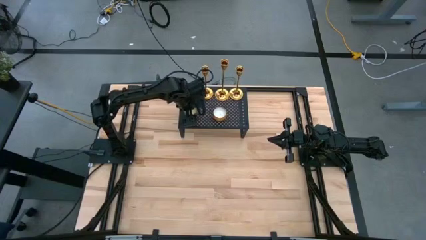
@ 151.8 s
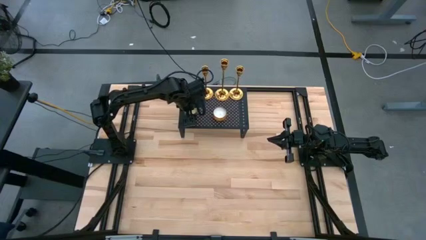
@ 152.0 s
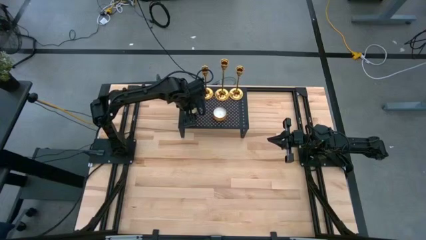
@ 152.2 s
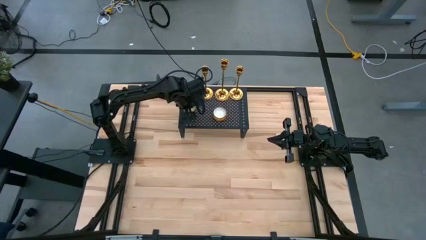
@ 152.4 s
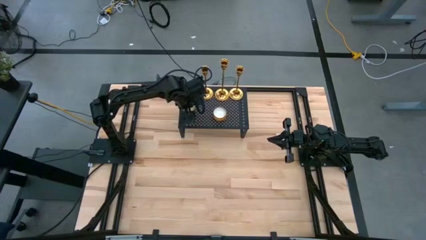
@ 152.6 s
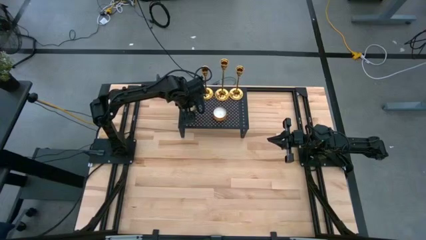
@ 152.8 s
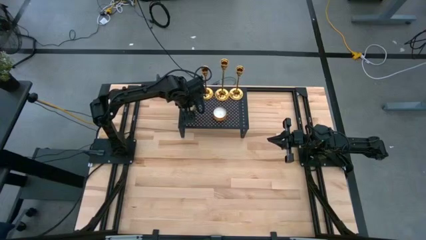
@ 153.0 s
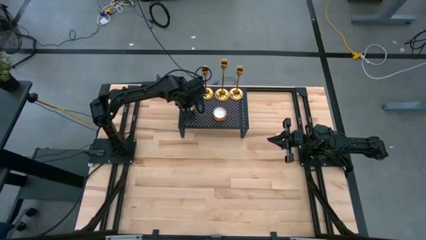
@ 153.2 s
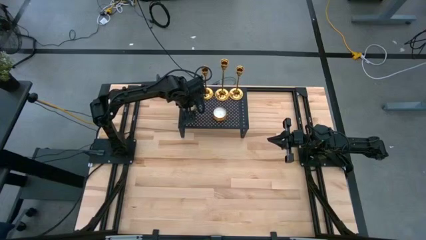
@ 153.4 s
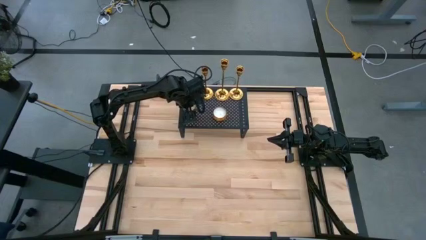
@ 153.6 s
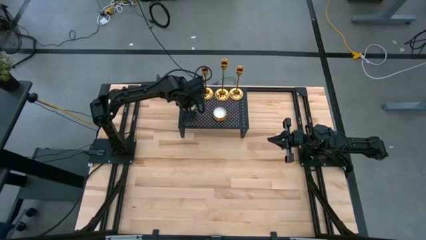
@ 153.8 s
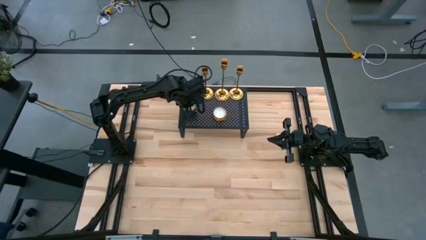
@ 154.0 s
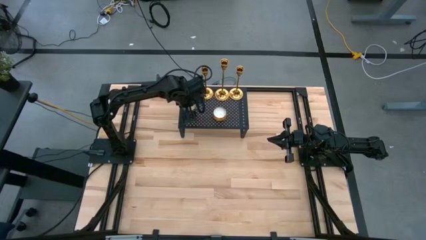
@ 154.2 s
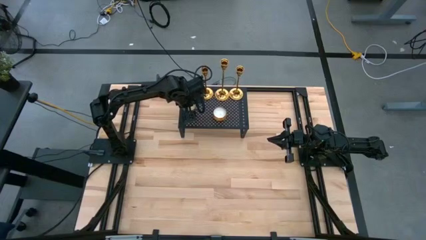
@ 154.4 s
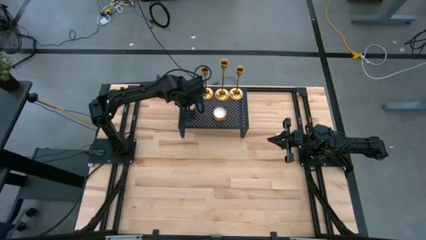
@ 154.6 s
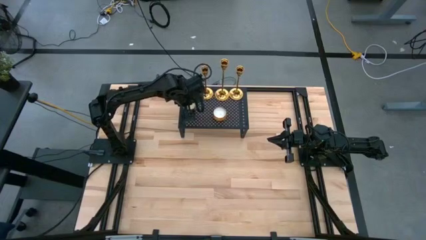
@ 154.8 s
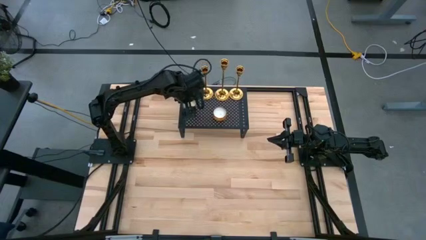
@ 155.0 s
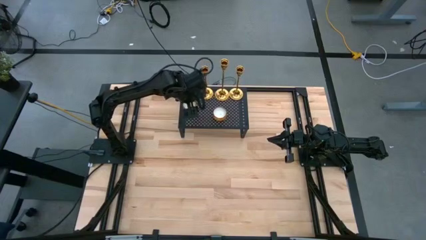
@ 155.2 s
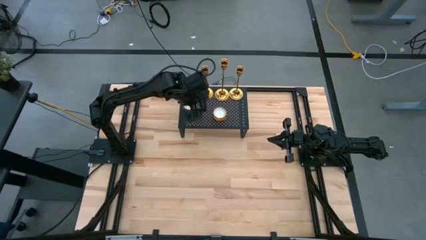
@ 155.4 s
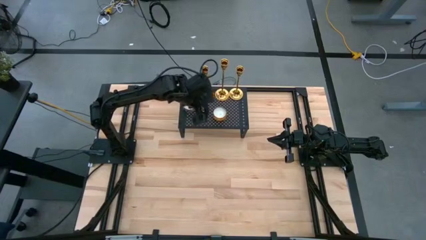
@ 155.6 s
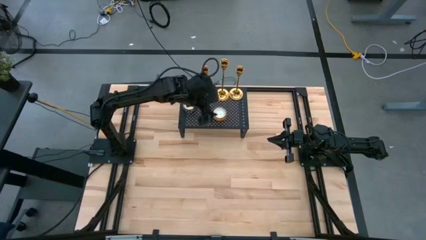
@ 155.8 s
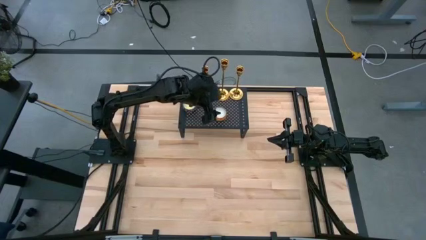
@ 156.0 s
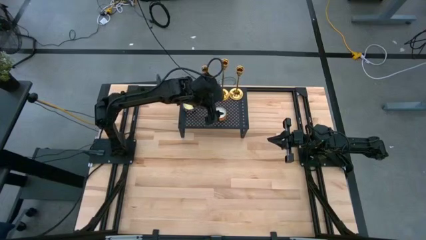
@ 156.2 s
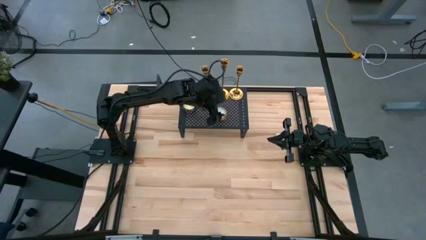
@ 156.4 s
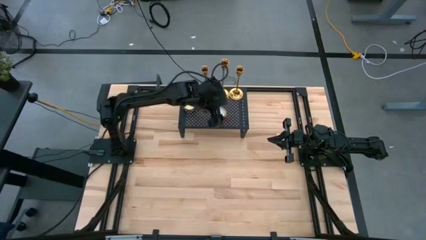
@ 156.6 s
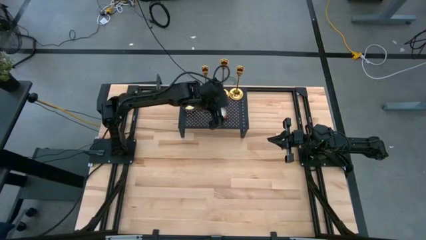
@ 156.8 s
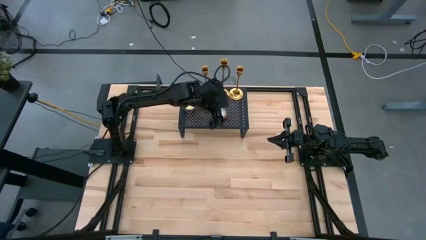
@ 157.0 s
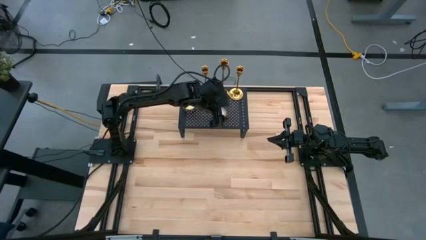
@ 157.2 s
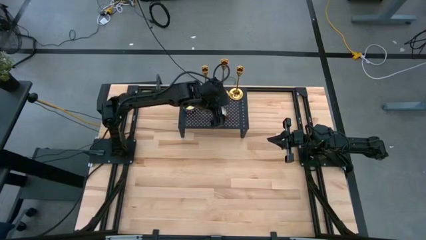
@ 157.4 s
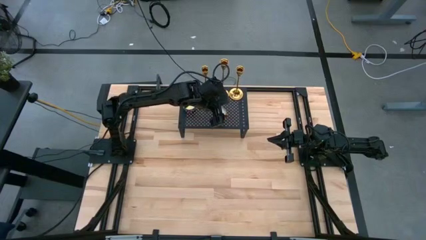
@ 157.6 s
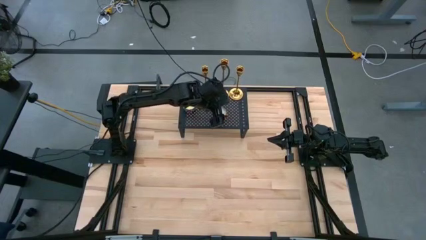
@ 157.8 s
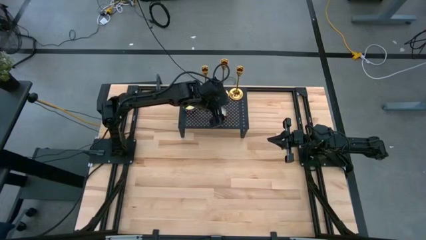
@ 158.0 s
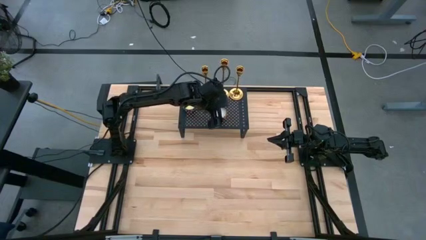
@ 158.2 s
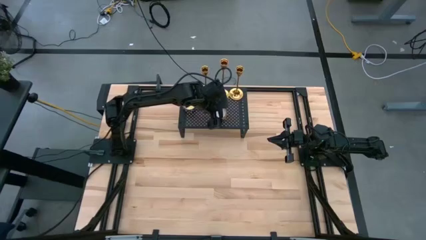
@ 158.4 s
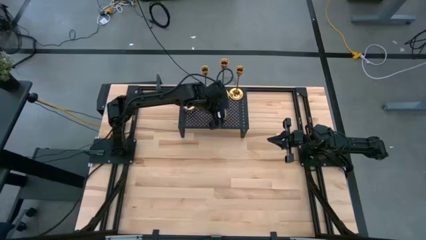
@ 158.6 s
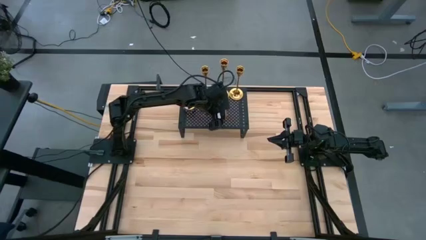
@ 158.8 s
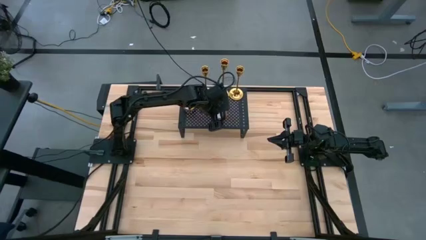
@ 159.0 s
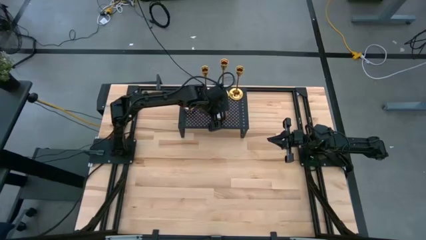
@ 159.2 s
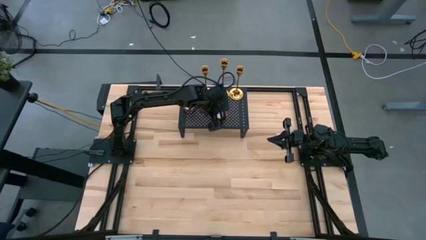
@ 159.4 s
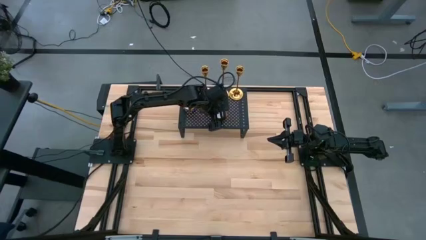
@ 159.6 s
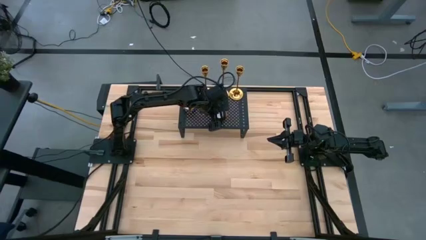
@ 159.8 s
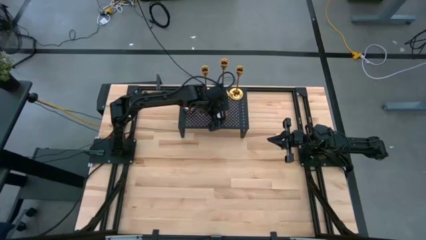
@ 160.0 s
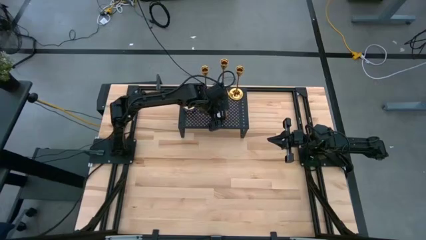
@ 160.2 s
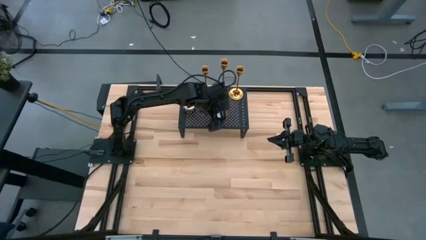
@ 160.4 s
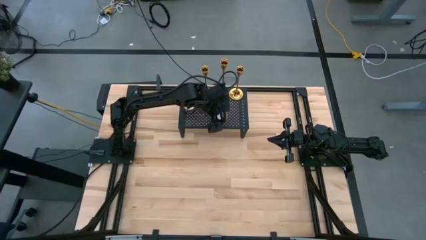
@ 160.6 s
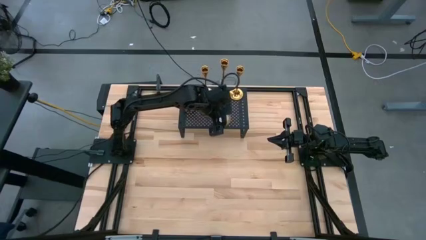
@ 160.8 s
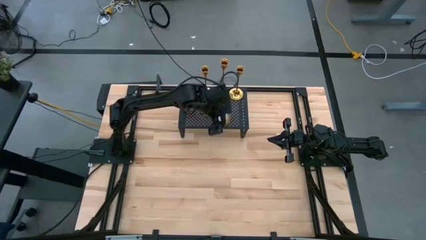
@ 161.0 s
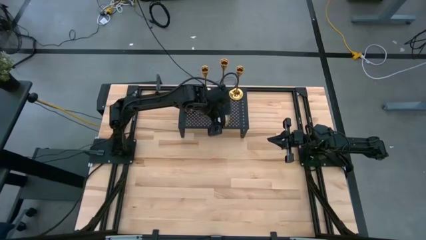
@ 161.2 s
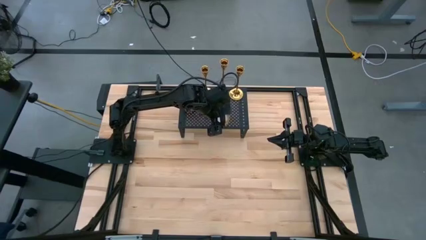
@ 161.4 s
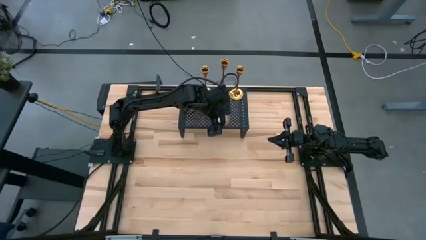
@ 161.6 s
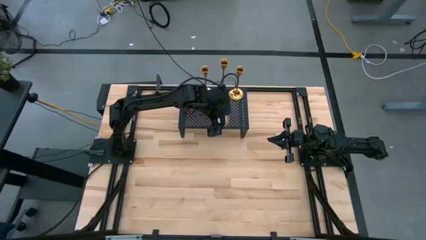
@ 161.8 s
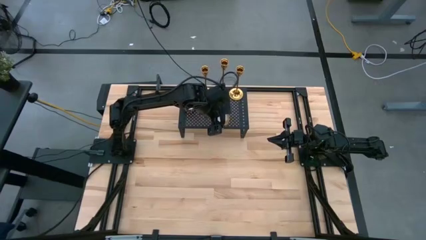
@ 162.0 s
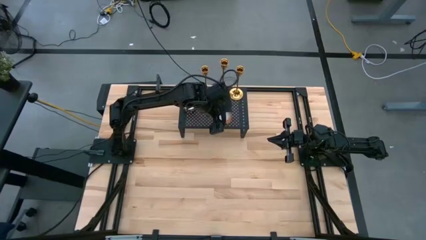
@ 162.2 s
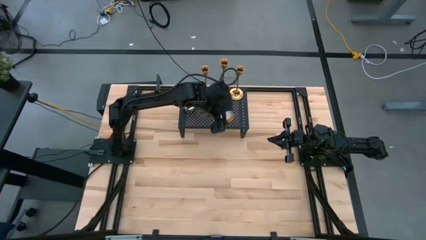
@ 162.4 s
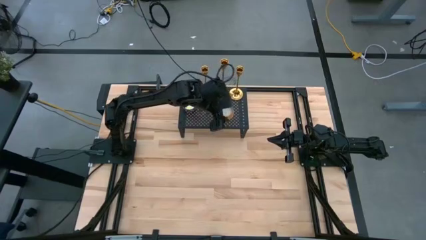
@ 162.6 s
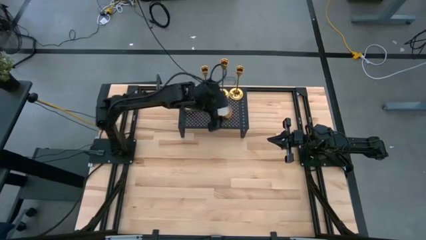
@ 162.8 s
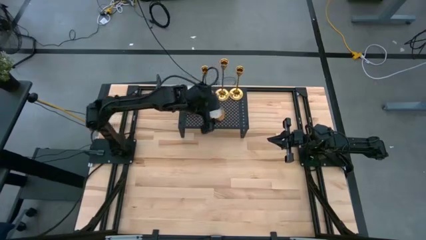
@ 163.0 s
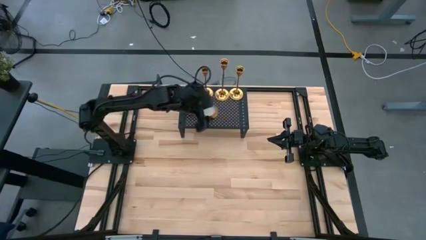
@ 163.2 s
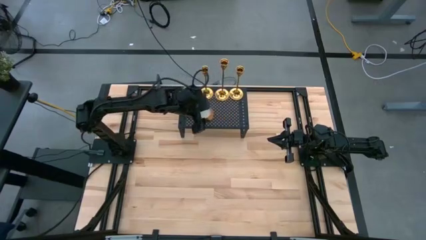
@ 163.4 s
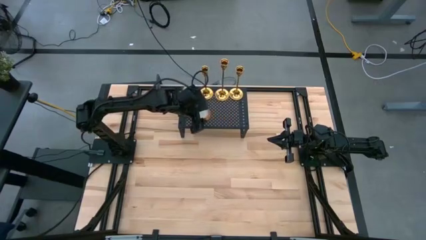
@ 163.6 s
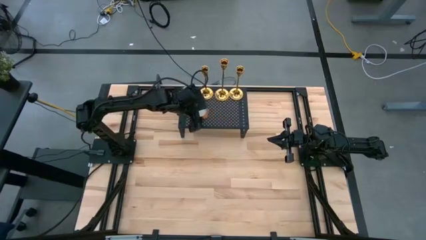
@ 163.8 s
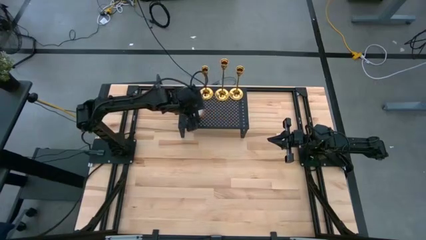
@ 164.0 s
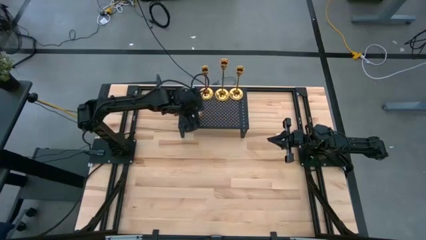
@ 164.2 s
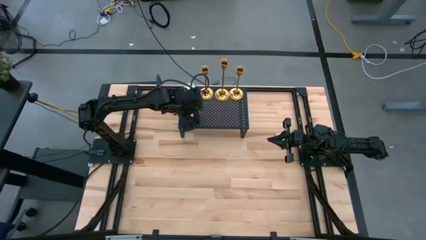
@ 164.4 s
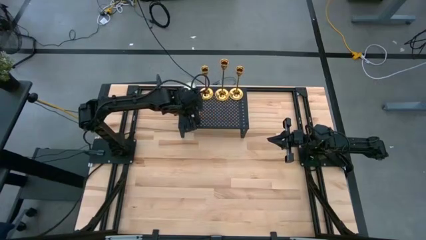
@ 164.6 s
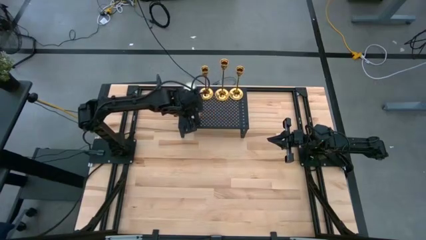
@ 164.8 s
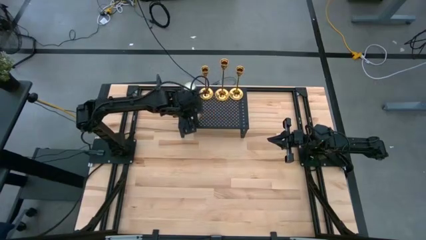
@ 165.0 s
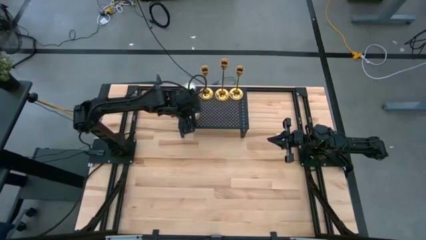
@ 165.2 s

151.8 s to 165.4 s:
Task: Pick & Place candle stick holders
Adjust the scented candles on the shelf
